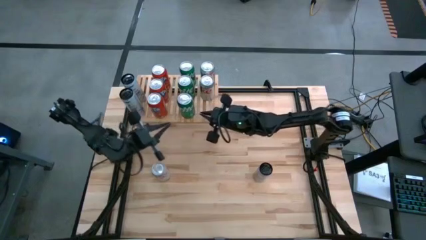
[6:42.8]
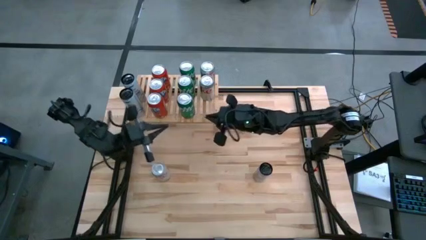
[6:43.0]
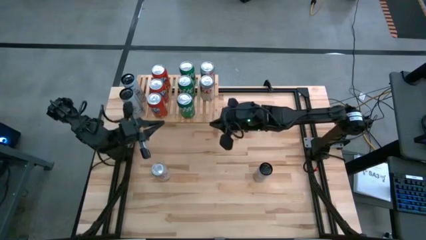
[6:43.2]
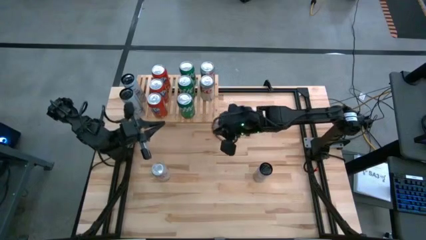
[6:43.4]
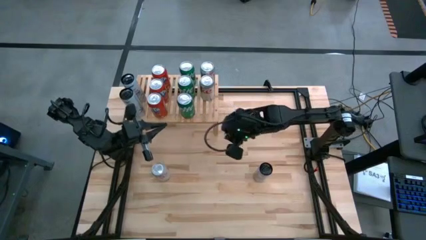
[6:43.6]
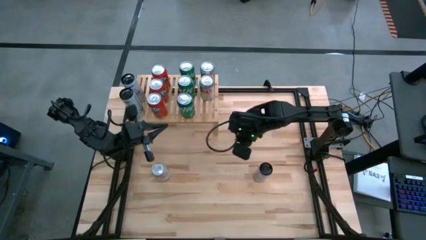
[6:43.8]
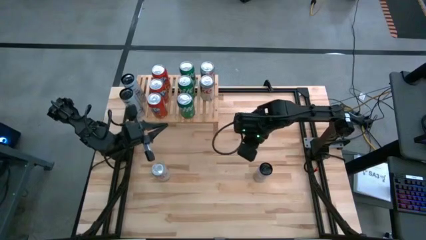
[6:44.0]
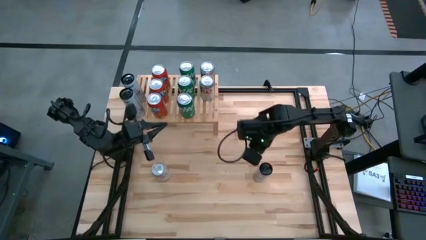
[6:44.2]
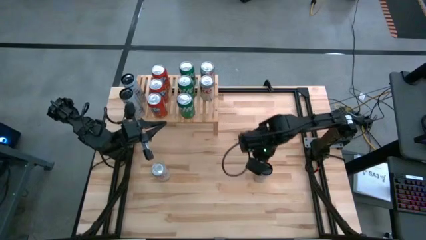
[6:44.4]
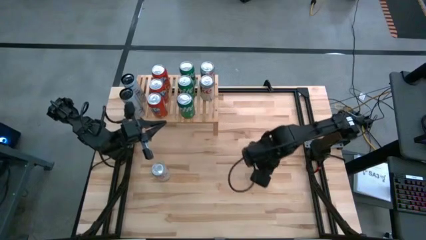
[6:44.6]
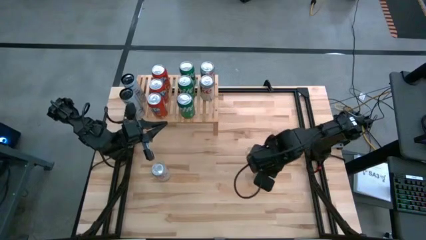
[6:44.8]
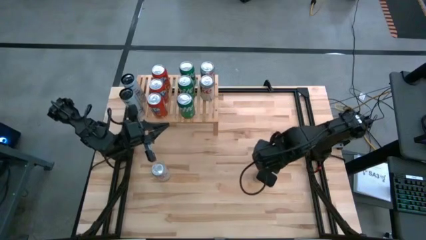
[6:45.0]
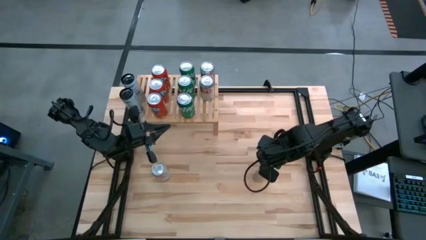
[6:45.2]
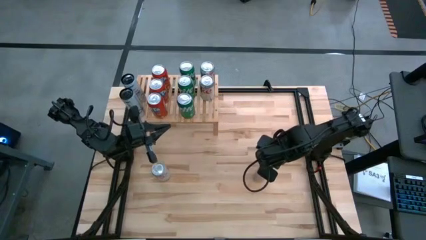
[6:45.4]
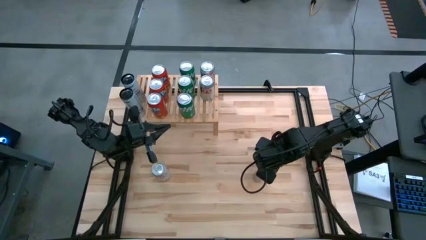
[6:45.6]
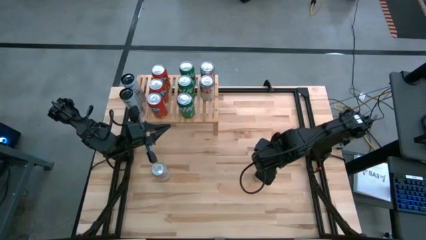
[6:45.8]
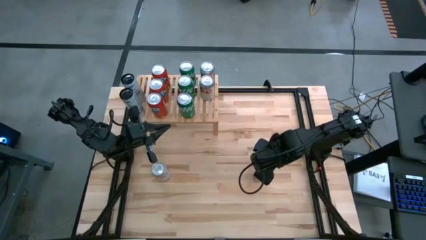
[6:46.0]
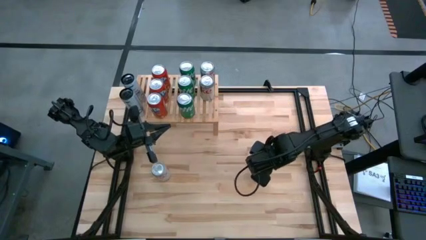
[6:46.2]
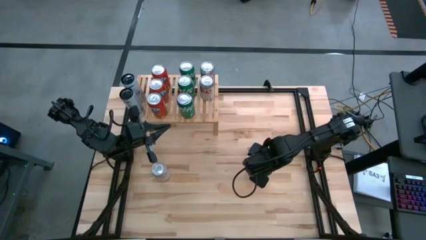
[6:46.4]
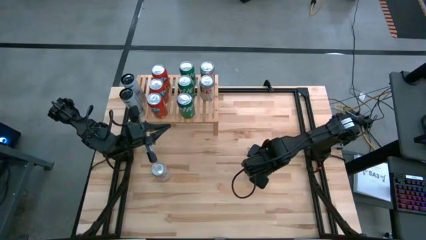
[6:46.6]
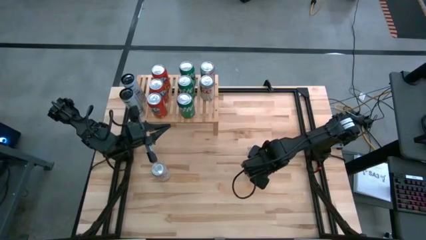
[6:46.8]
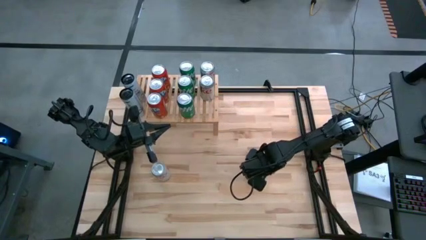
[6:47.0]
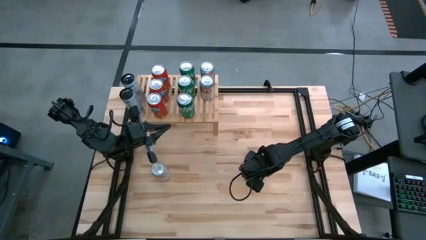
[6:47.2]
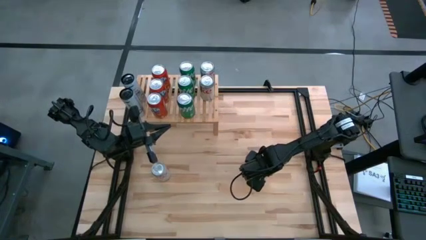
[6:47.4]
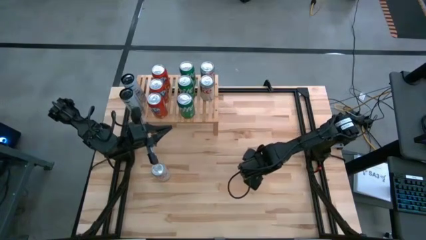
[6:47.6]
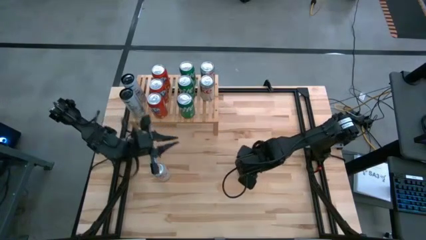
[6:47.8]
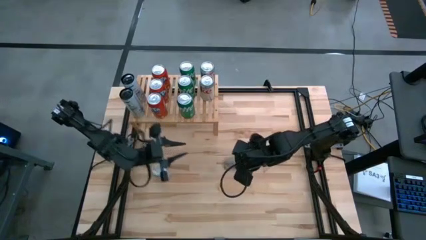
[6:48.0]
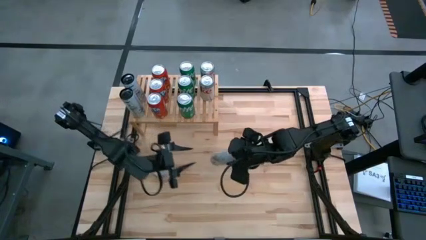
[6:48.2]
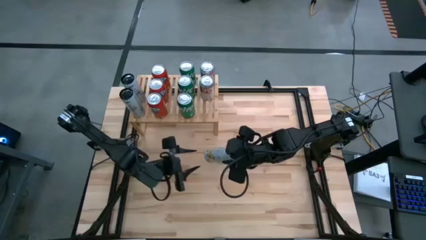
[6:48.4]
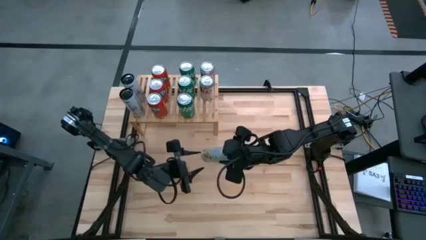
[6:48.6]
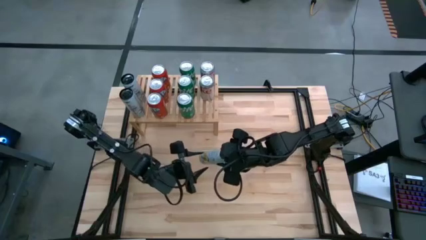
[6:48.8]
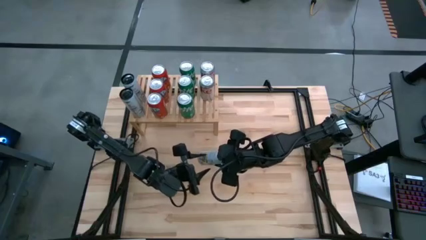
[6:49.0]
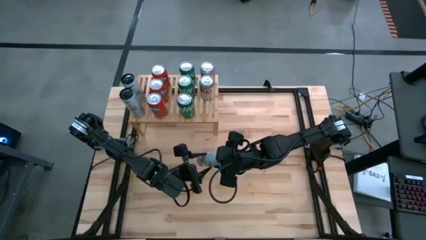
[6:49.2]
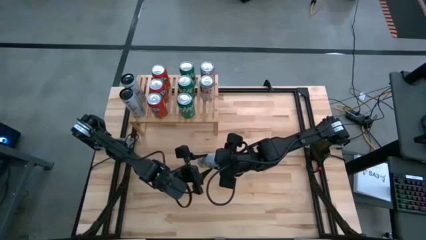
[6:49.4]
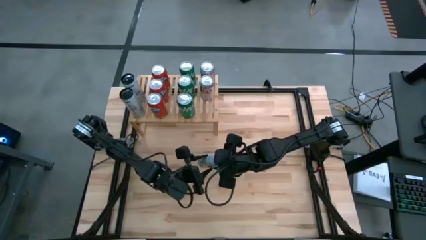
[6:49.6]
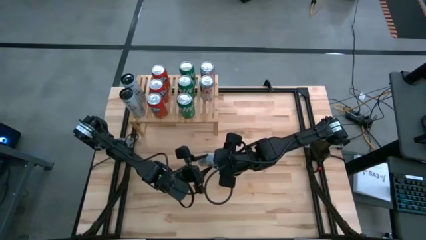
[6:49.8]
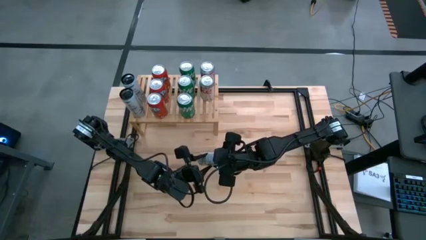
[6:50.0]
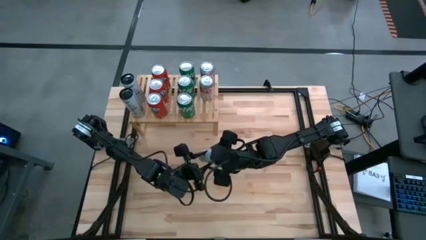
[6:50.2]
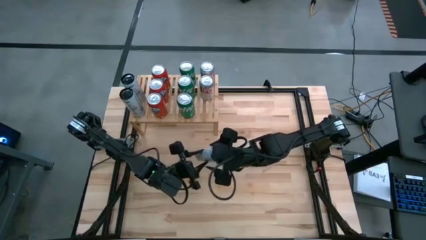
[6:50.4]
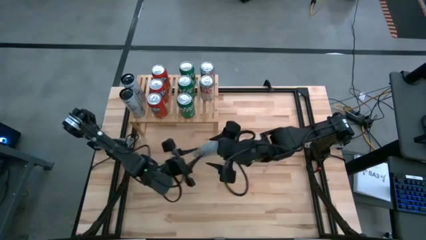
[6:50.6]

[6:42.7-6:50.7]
Task: Place canned beverage on shelf
Put the white and yellow soda can on the shelf aligned with the other white and yellow soda can

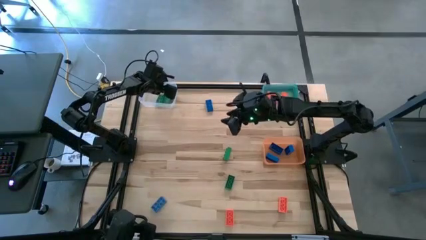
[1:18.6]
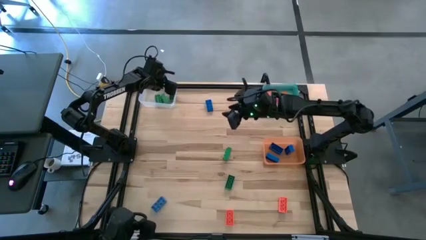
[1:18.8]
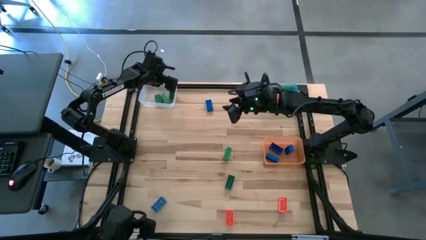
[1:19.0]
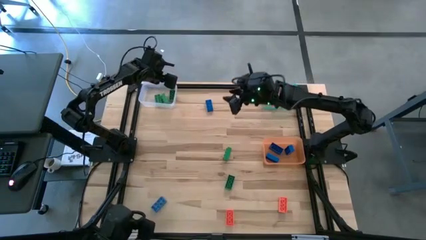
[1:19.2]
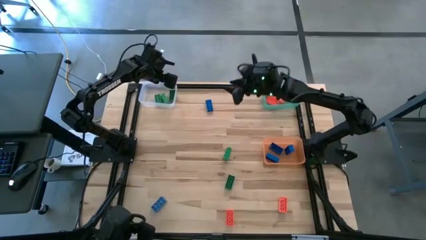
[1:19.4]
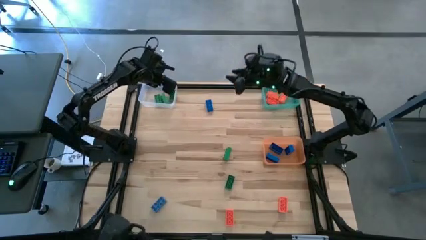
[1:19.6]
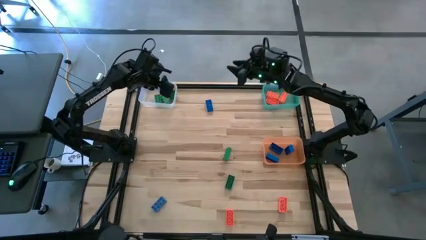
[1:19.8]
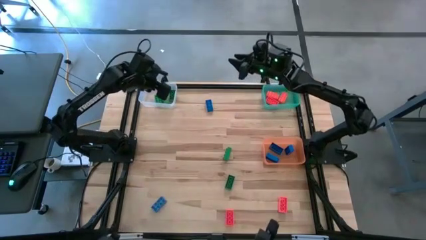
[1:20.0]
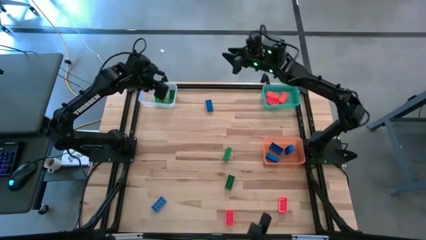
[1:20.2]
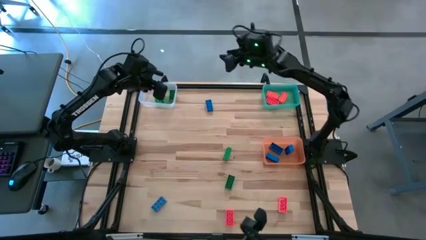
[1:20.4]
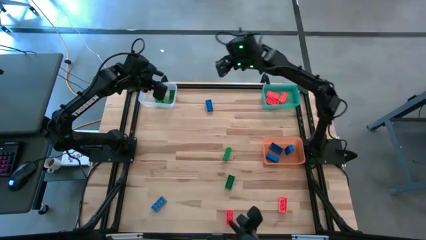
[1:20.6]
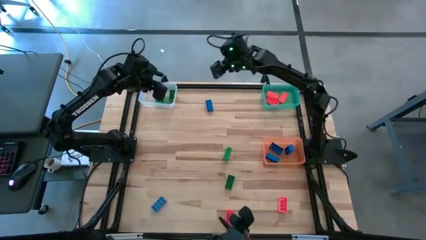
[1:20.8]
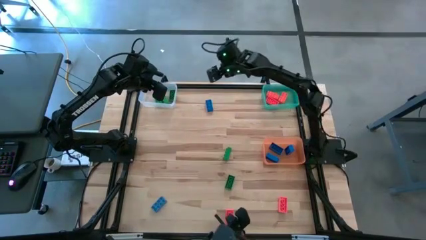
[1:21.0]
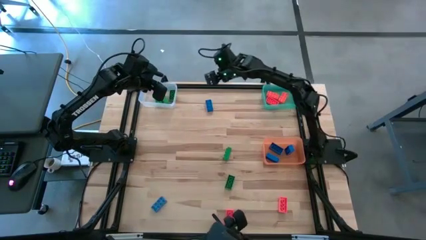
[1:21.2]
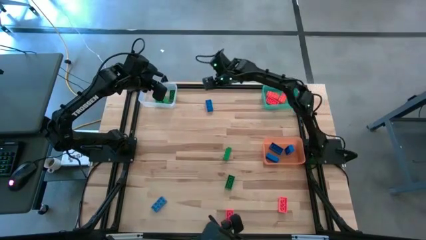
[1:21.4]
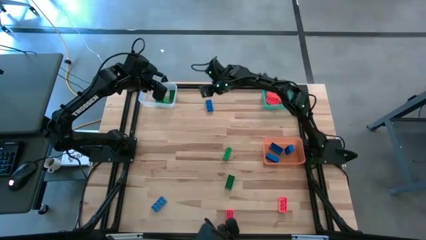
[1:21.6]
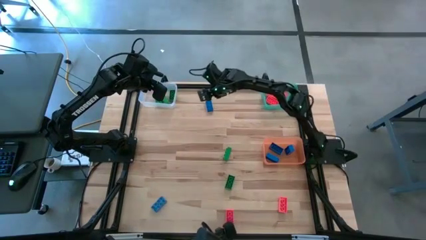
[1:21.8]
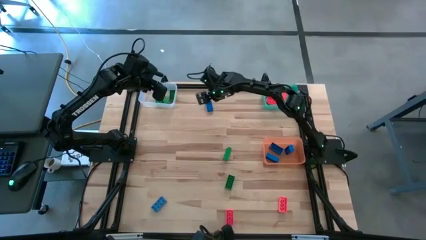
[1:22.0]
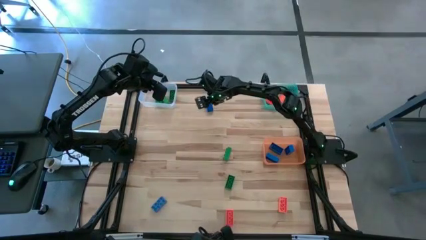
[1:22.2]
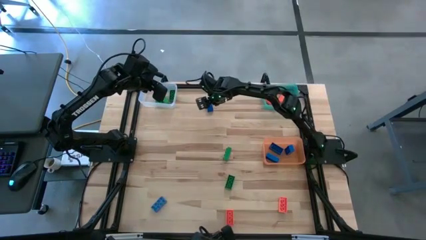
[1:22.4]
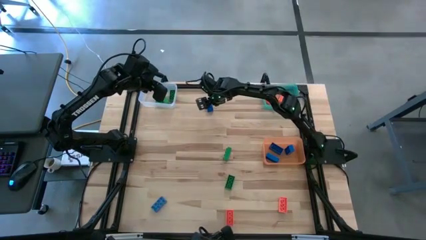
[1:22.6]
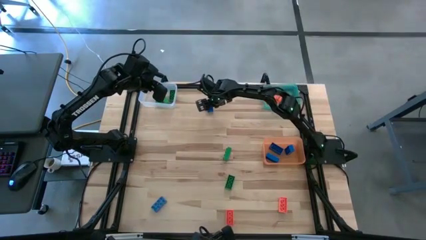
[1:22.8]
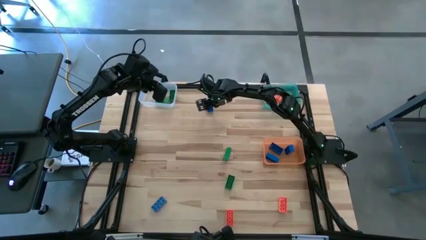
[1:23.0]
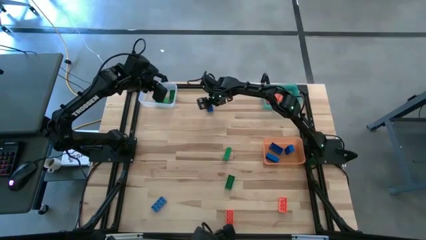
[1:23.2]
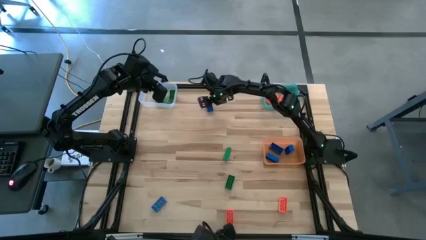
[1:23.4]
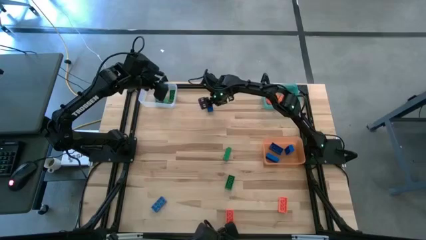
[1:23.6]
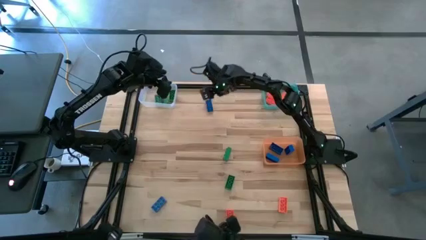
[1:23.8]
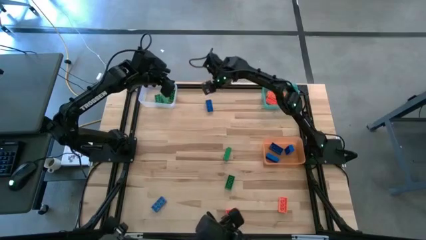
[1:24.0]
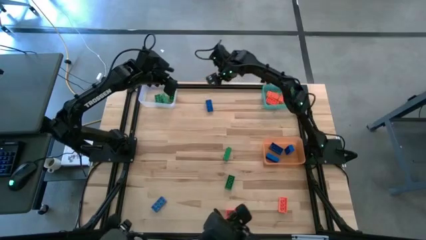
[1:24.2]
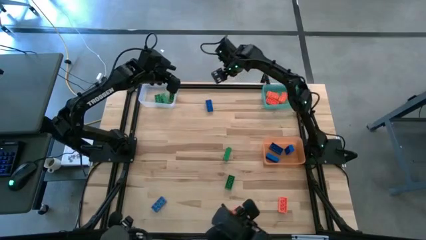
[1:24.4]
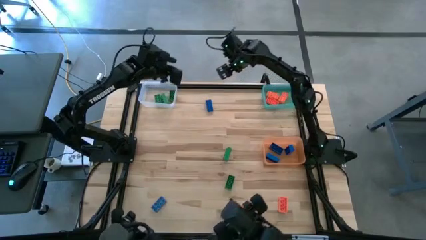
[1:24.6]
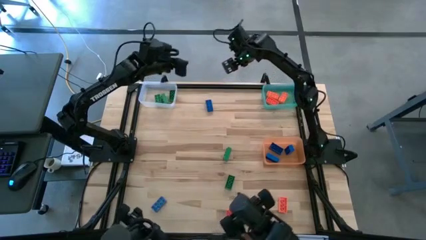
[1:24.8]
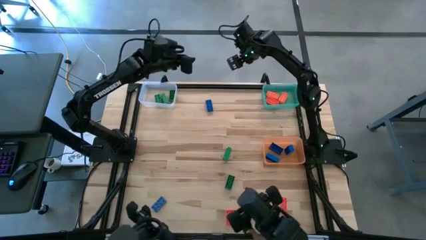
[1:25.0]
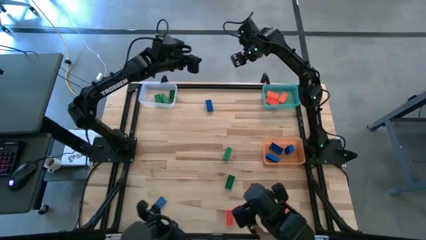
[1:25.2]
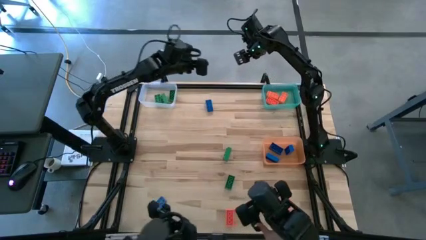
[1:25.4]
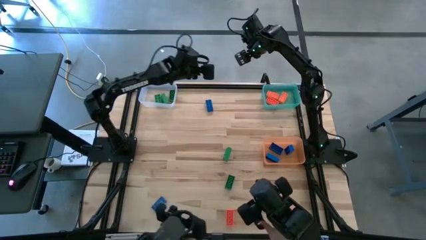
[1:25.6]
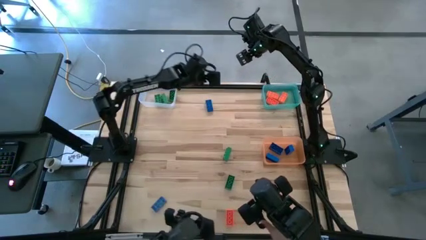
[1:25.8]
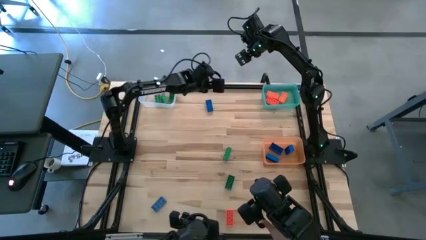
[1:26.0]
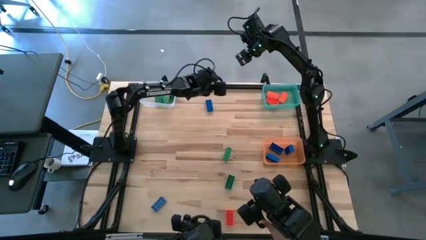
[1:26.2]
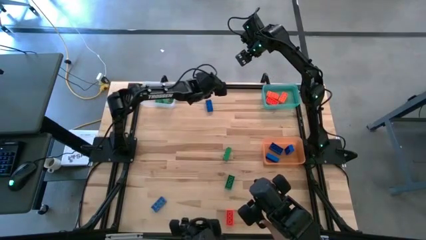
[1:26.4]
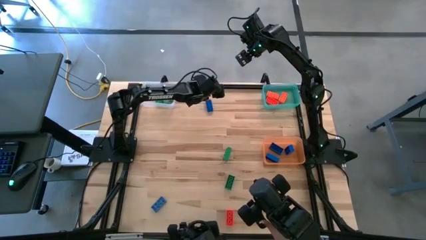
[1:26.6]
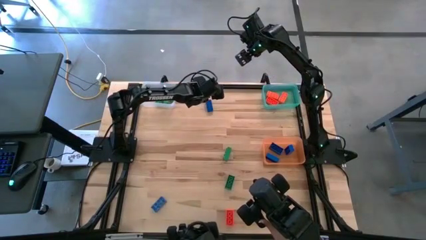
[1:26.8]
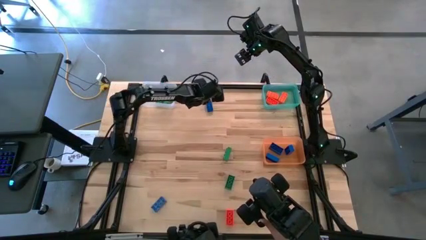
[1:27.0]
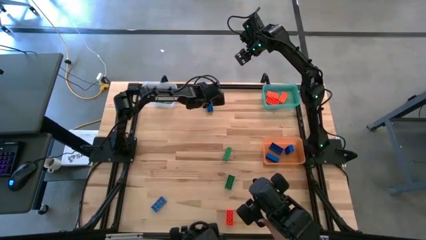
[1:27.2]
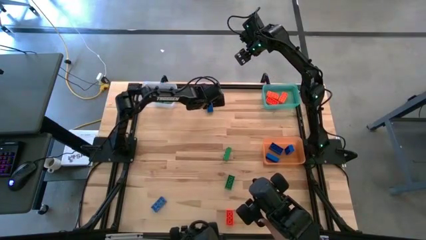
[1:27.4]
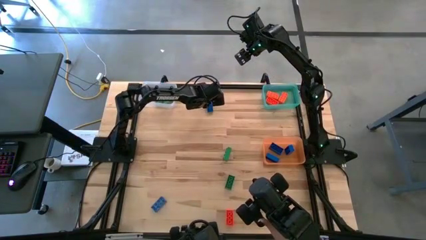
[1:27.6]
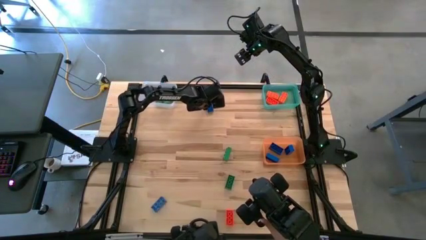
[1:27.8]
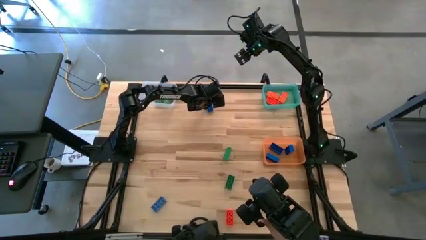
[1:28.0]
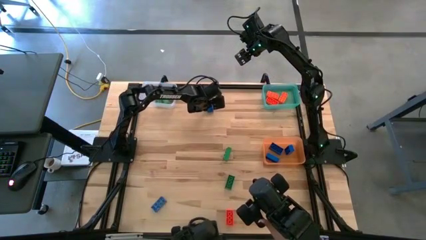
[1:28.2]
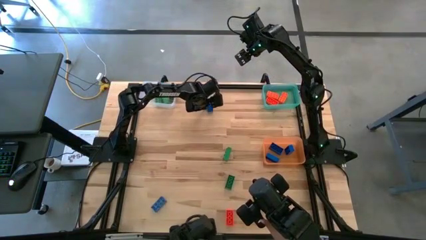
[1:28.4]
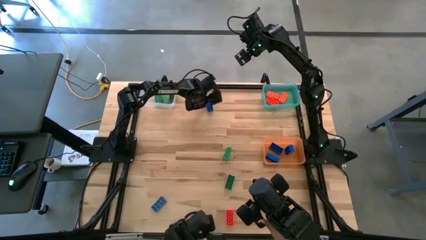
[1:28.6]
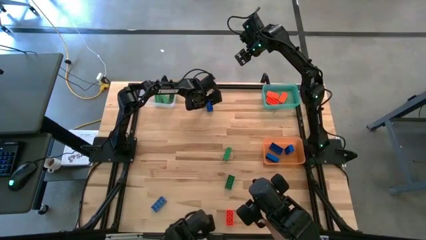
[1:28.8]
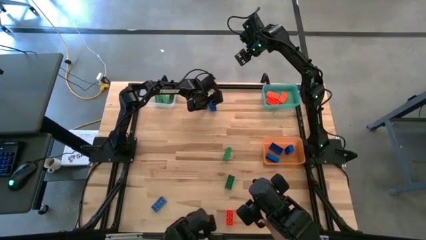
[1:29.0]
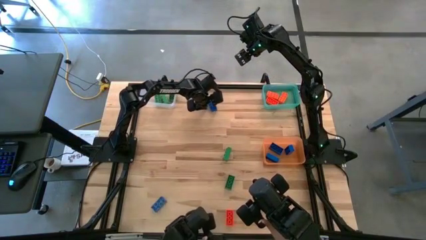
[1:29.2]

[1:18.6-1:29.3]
Task: Sort & place blocks by color
Put the blue game piece into the orange bin
